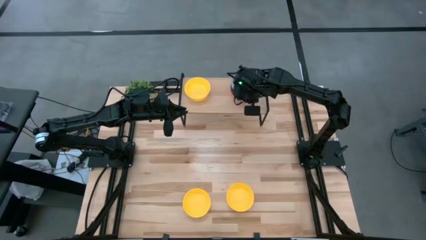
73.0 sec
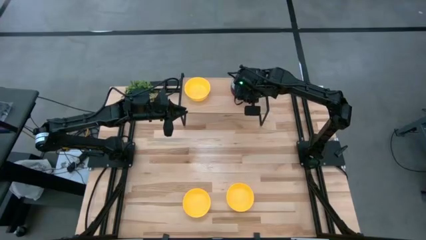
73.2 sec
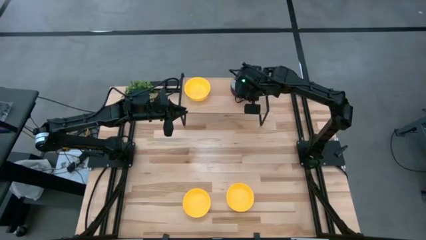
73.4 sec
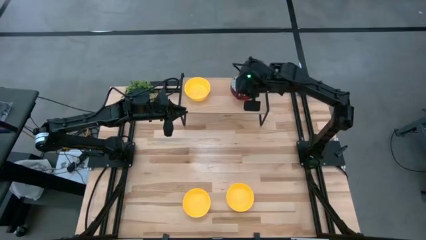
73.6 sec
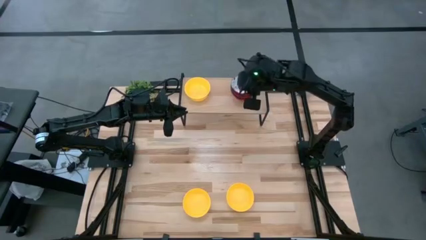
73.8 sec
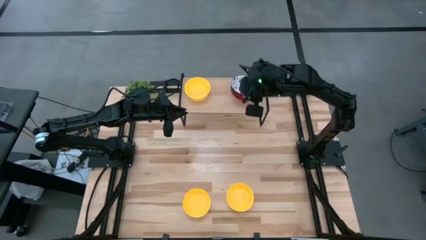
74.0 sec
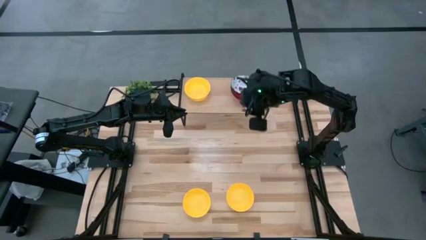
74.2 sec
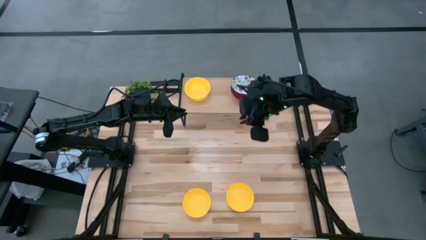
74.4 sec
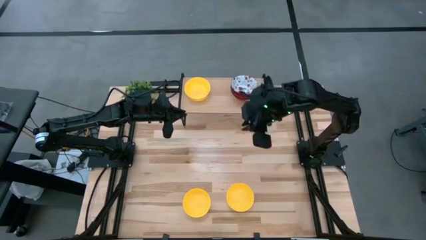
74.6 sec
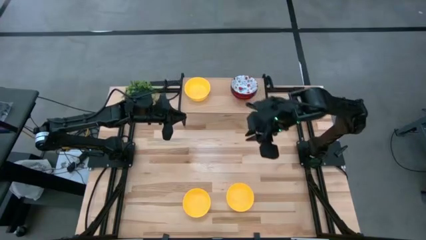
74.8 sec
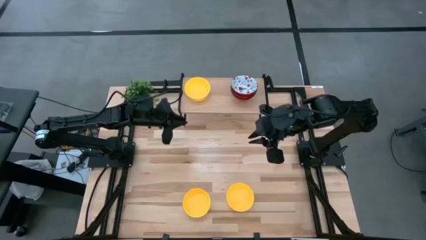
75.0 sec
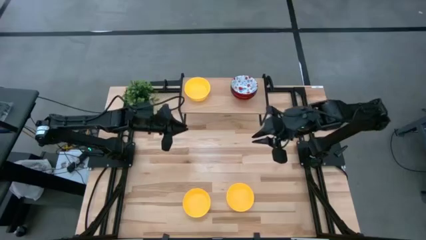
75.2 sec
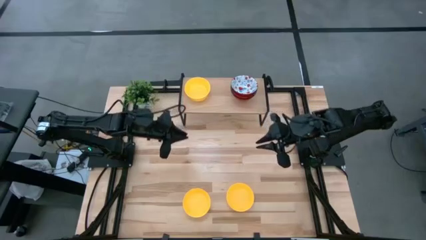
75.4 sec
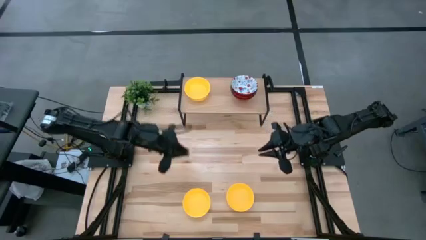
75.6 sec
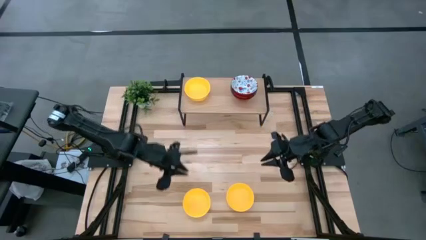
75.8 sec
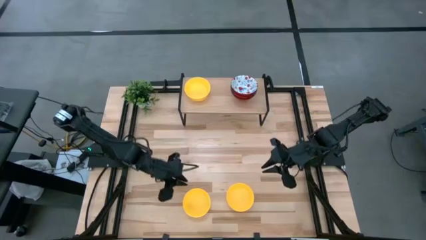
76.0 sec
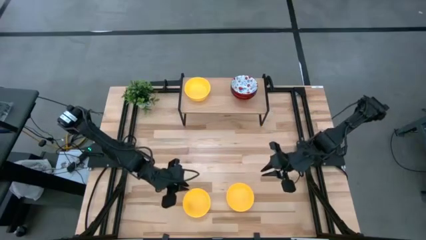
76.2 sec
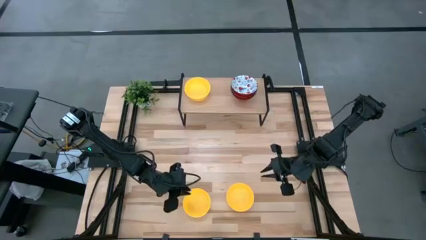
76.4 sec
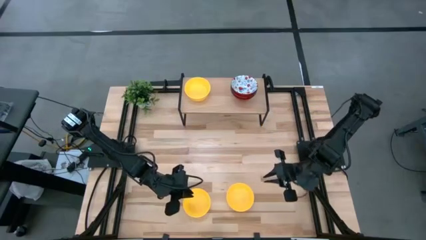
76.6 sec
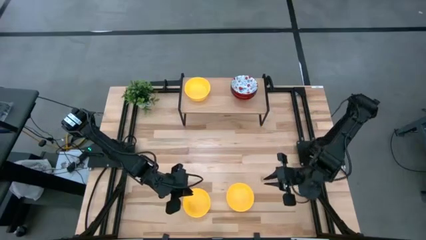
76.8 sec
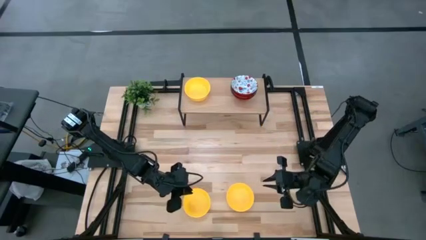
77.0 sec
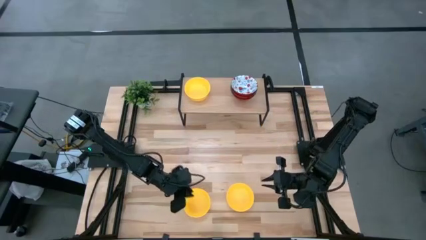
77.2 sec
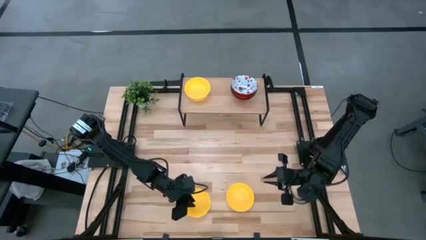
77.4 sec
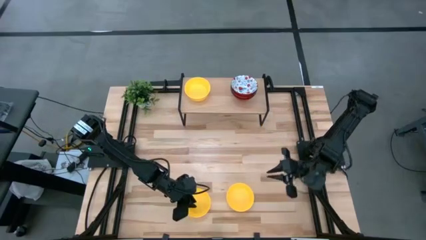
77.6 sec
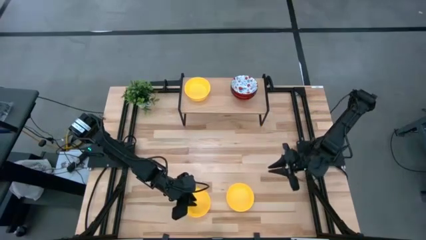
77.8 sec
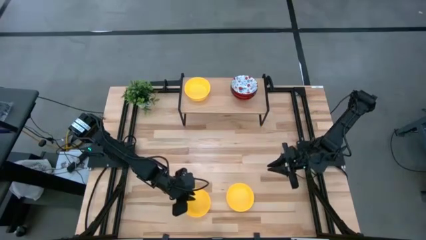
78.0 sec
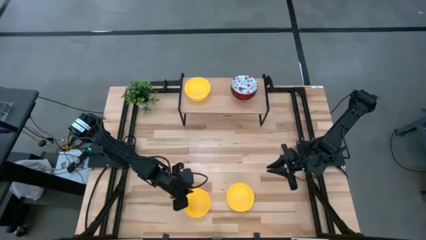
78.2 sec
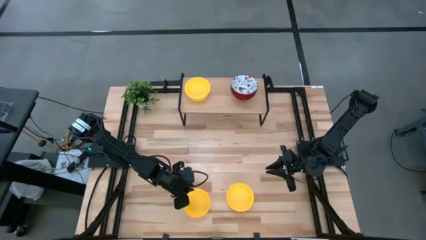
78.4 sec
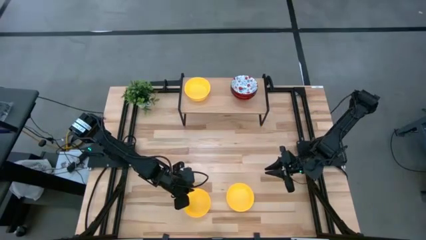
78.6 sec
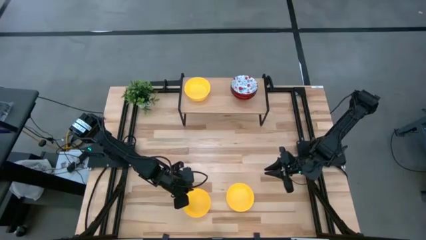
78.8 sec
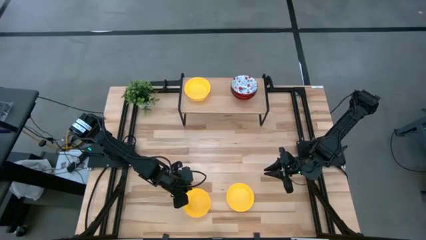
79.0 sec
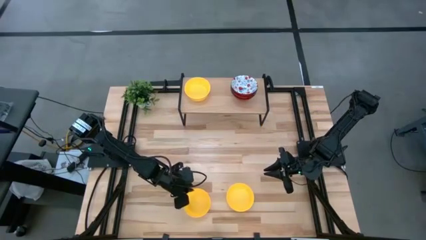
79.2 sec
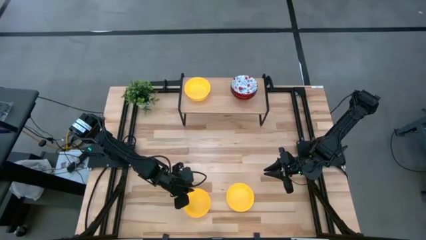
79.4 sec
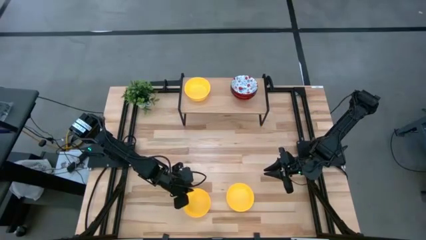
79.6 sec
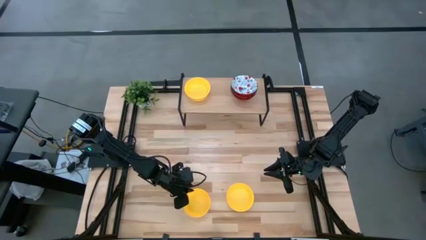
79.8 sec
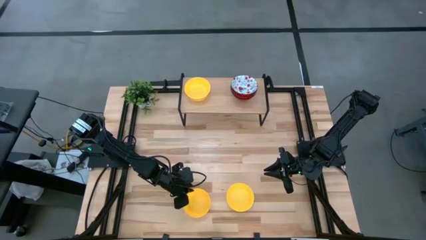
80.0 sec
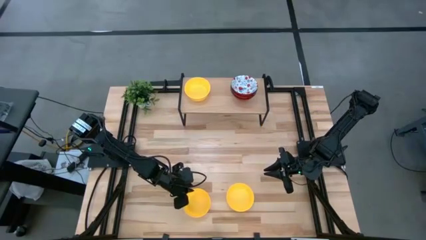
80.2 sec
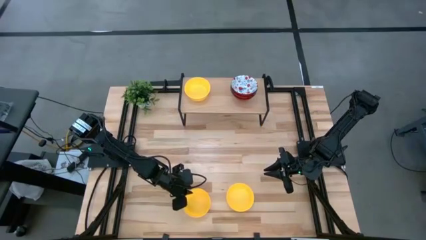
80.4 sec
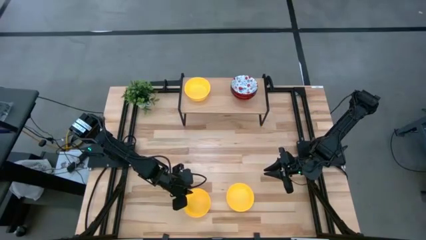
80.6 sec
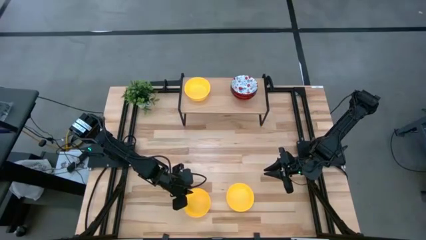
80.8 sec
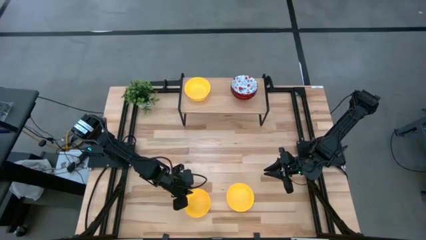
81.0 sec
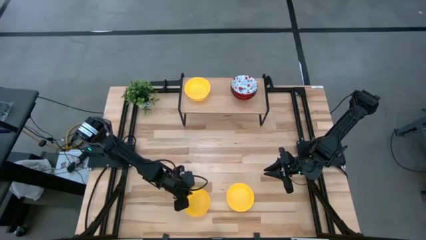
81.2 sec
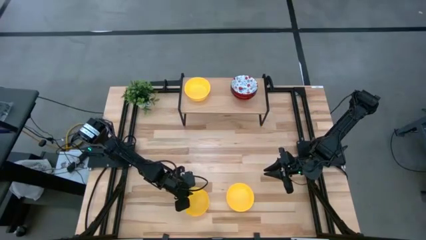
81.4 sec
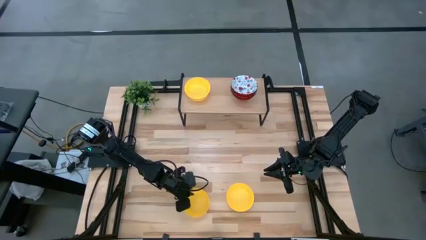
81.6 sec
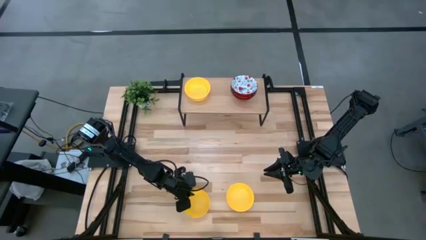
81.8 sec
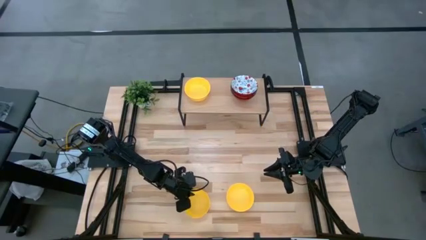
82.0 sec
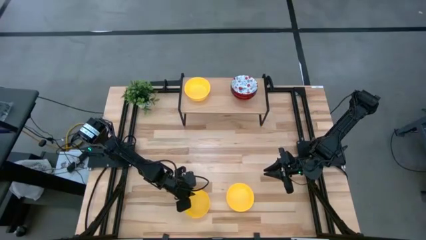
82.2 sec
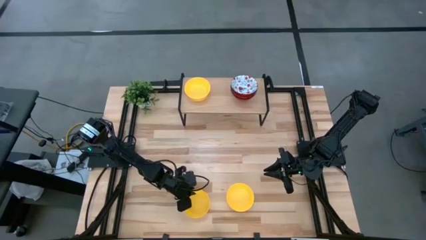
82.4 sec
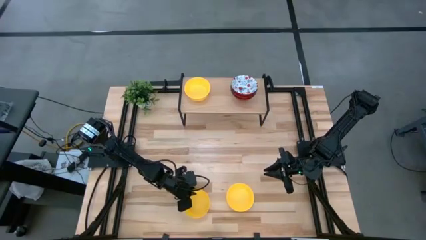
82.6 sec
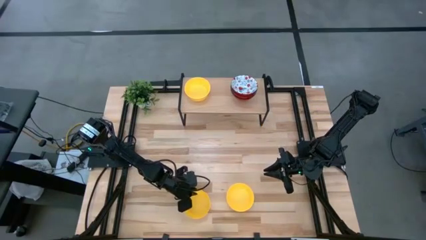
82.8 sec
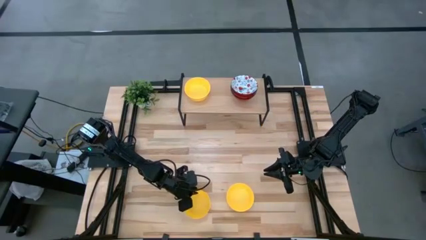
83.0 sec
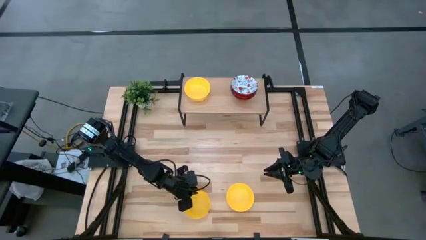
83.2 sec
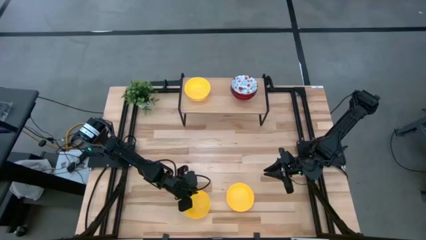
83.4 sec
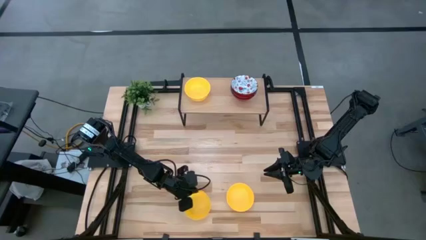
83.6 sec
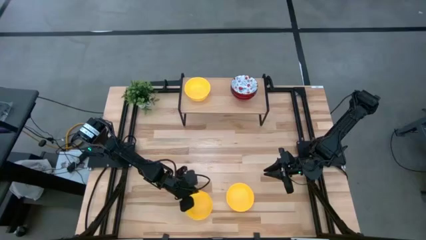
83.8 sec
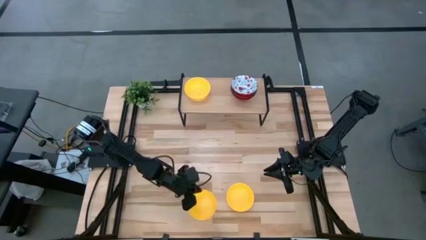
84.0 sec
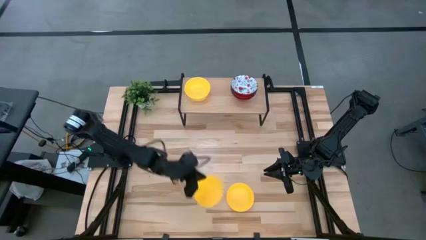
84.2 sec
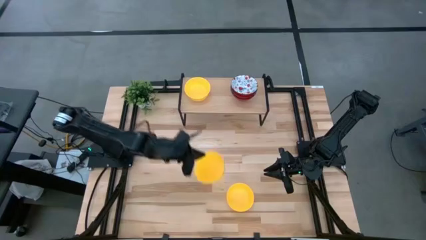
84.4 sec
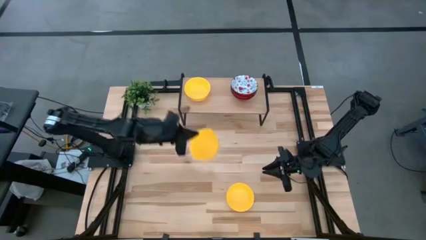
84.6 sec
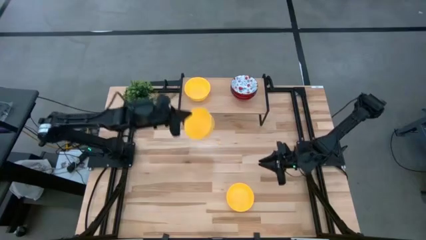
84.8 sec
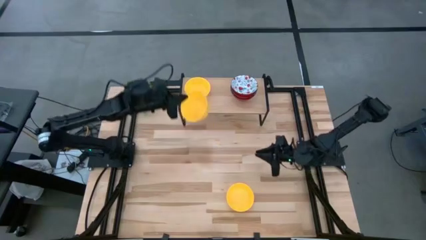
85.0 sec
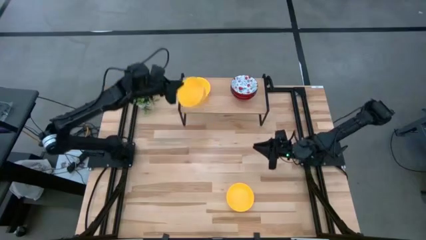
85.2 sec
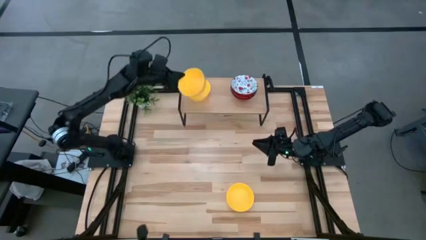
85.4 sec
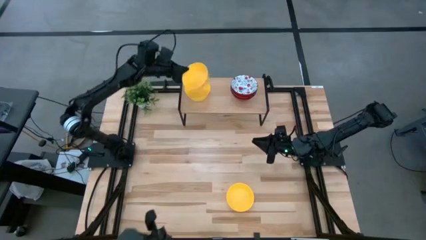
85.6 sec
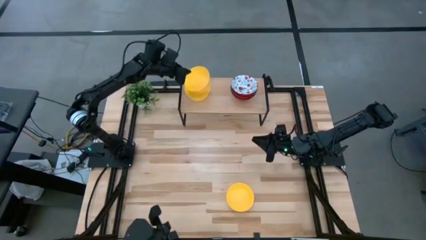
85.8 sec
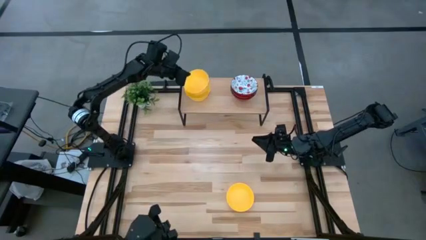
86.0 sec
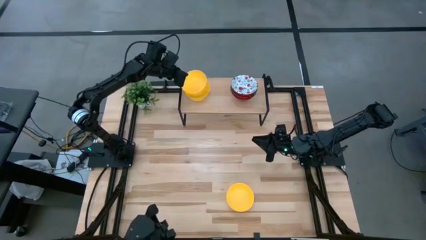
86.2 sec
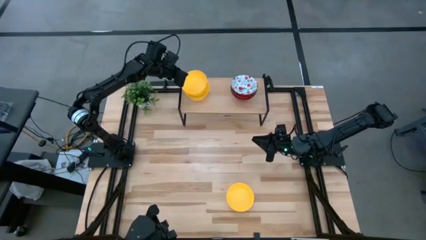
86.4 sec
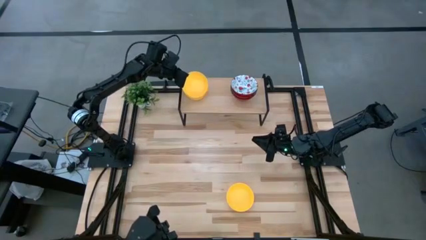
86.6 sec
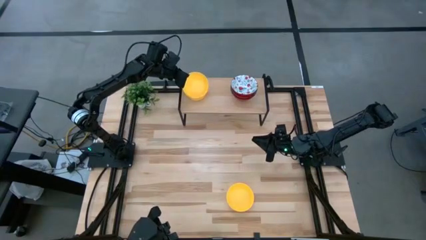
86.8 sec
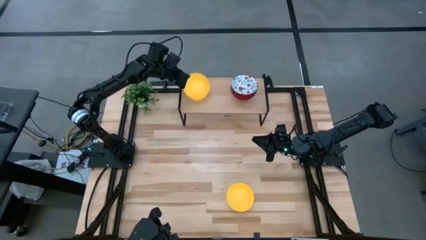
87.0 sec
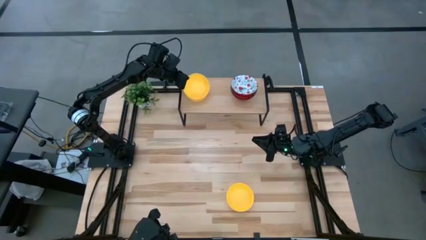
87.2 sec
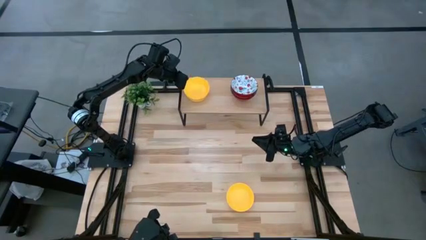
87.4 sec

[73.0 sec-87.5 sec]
Task: Pick & Place Mini bowls
Stack the left yellow bowl on top of the yellow bowl on the shelf
